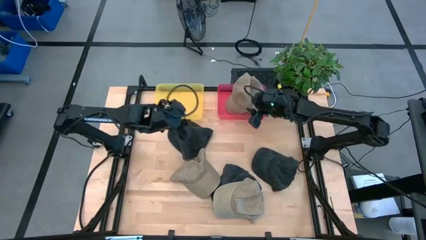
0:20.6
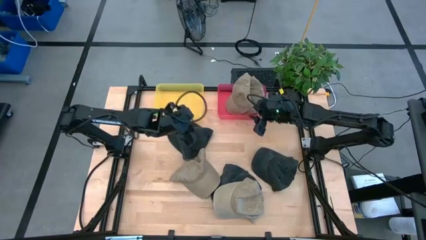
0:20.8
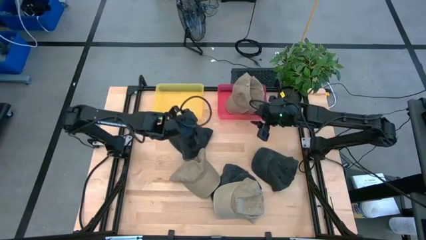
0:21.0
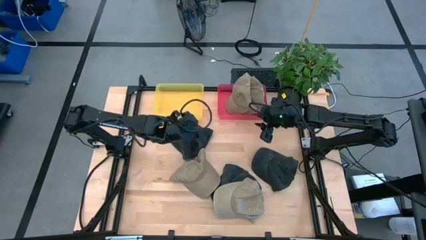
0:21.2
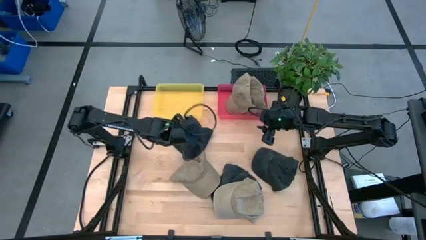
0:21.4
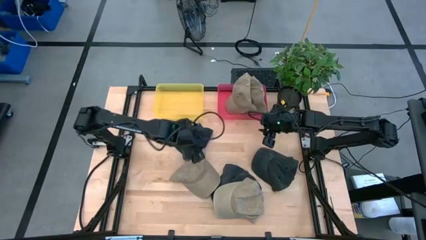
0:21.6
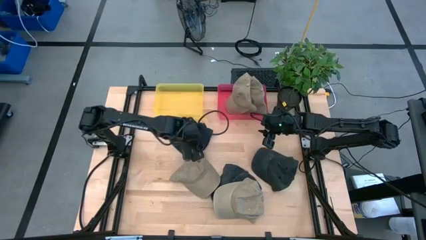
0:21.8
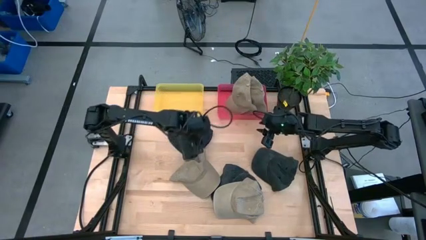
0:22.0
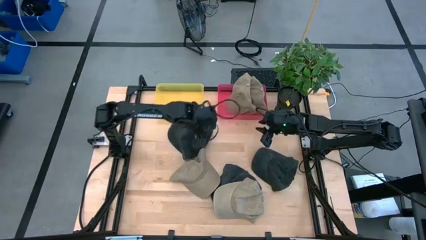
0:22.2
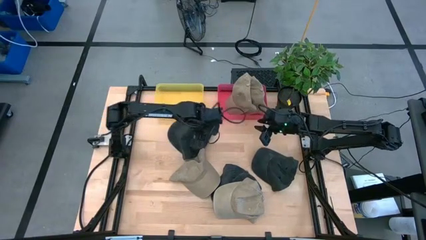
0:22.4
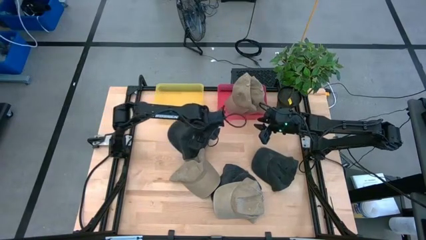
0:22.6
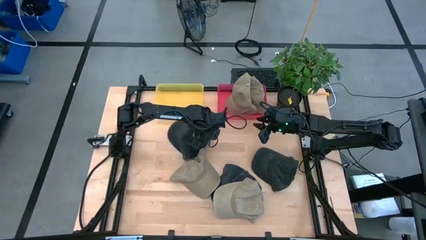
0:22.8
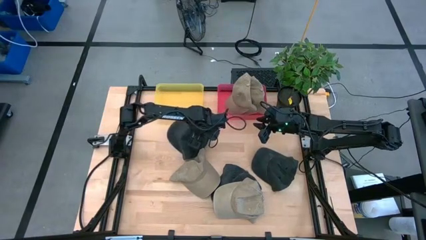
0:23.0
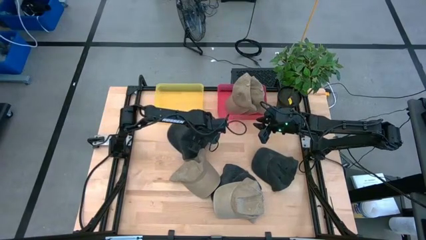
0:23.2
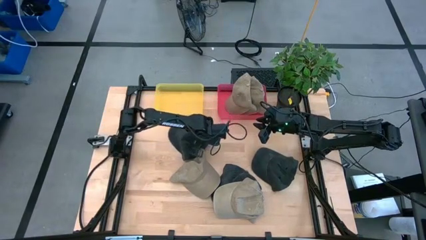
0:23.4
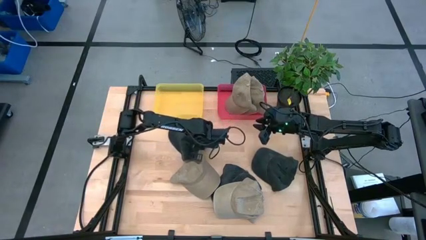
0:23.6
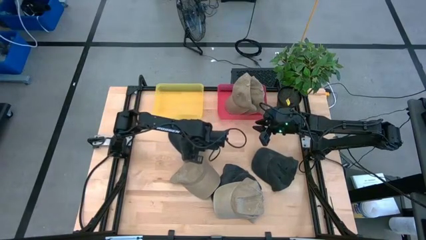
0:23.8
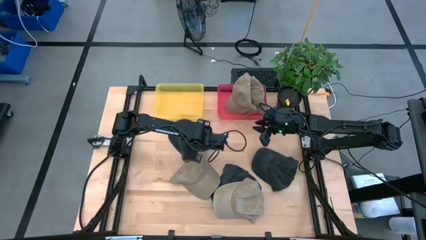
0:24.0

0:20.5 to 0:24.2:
Task: Pick & Place hat
Put the black cap into the yellow bin

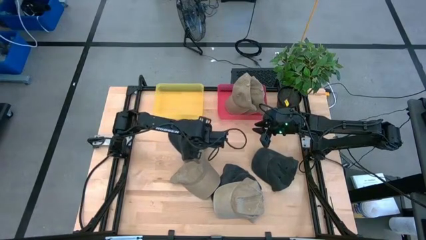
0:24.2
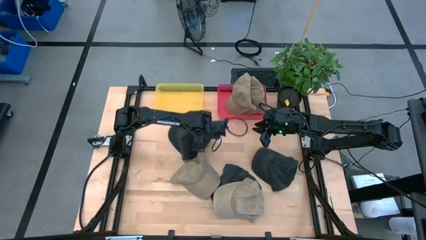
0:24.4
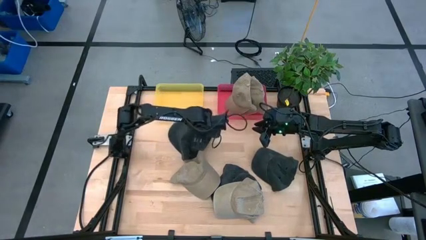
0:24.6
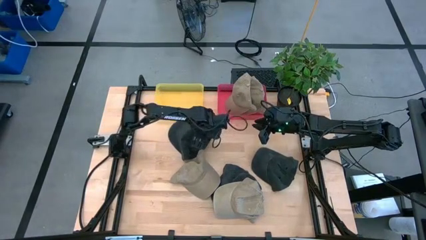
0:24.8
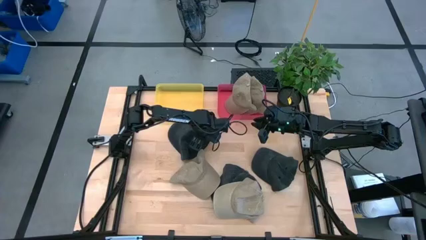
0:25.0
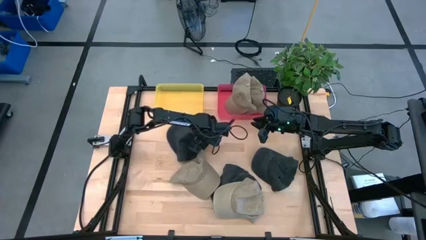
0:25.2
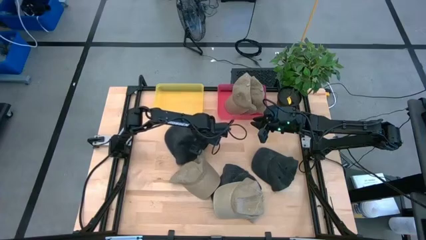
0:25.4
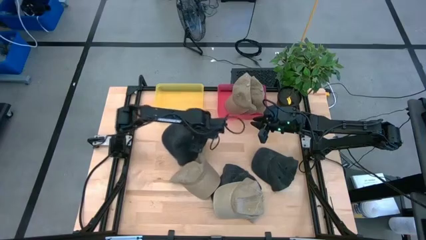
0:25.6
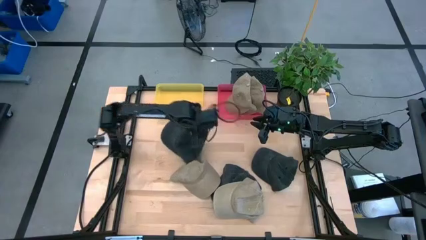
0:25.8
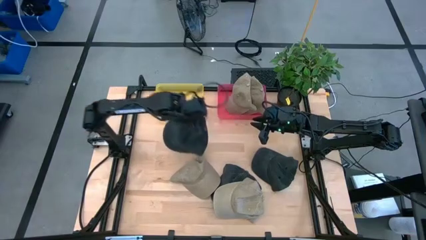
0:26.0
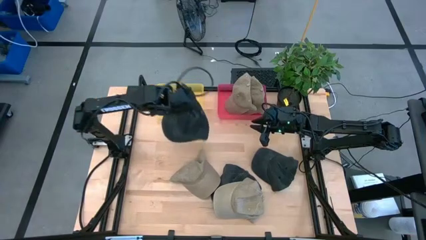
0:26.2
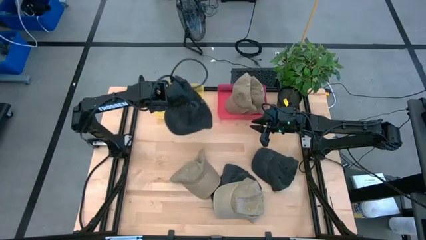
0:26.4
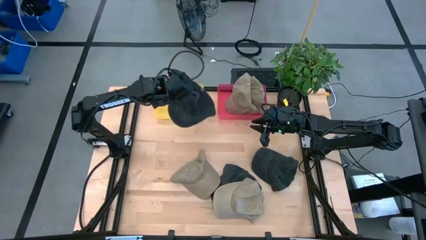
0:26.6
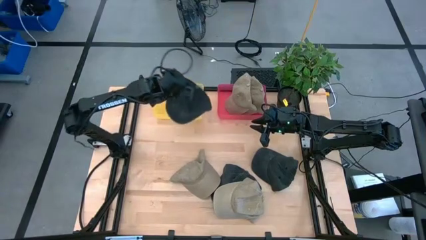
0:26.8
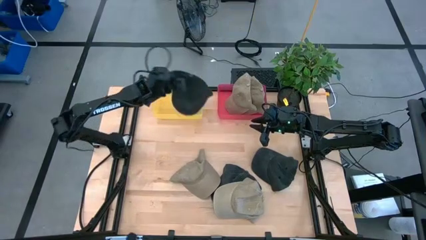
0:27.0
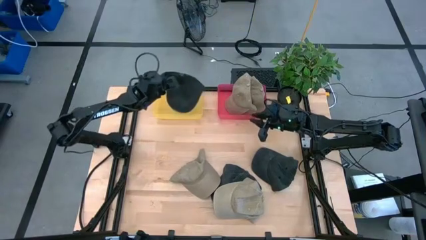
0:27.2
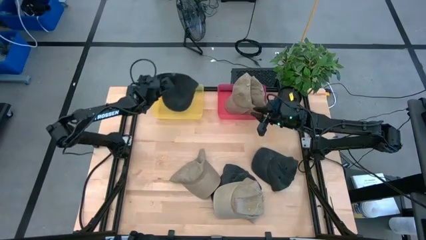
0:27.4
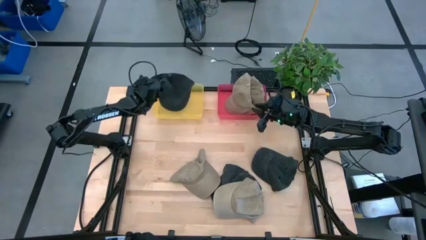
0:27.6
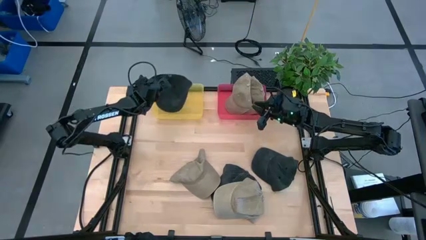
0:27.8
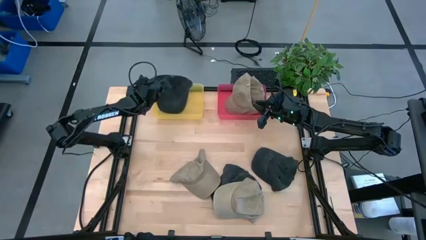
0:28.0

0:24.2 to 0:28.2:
Put the black cap into the yellow bin

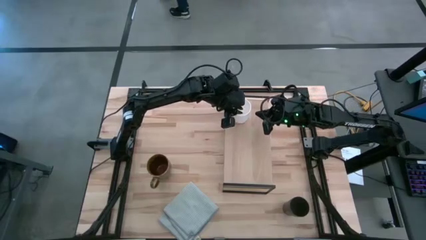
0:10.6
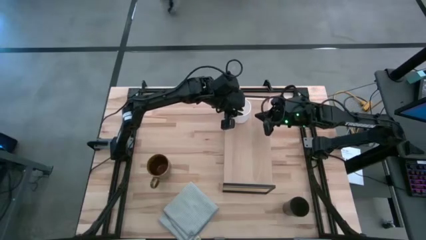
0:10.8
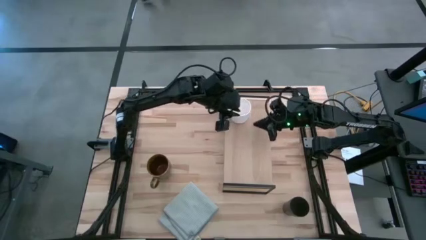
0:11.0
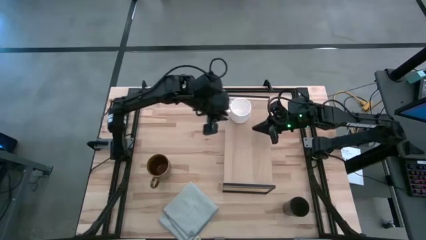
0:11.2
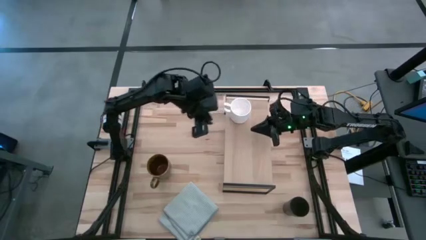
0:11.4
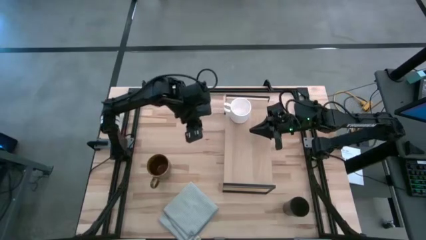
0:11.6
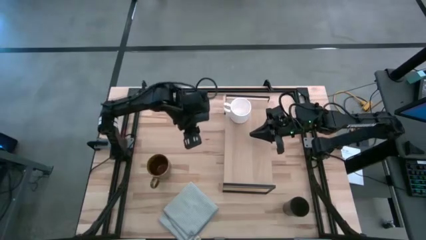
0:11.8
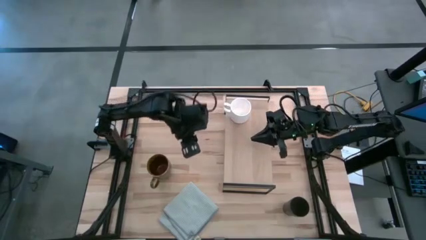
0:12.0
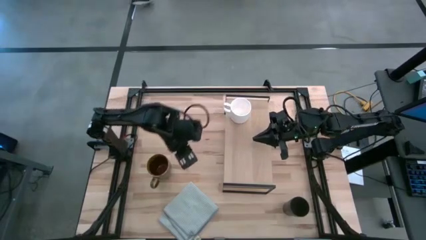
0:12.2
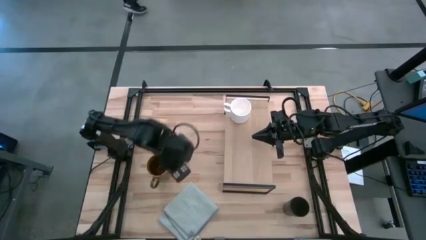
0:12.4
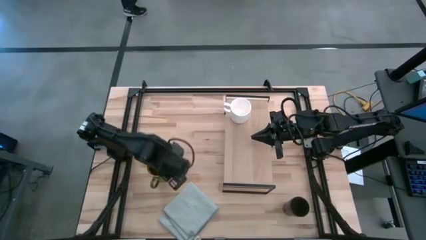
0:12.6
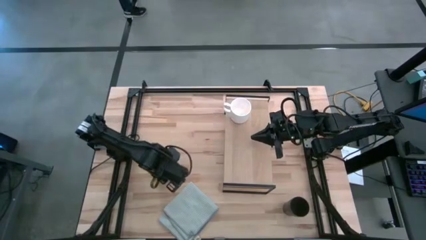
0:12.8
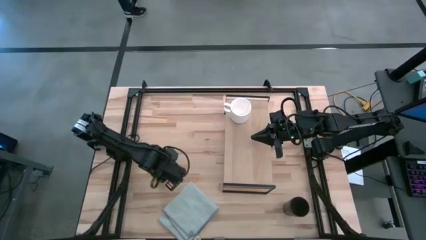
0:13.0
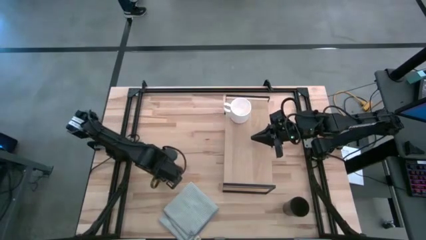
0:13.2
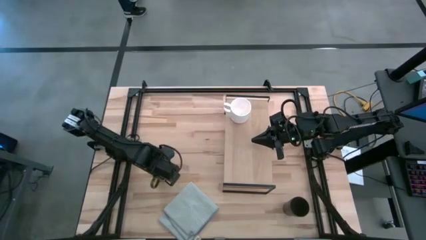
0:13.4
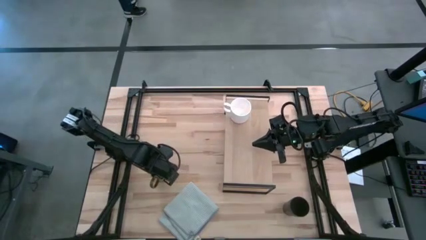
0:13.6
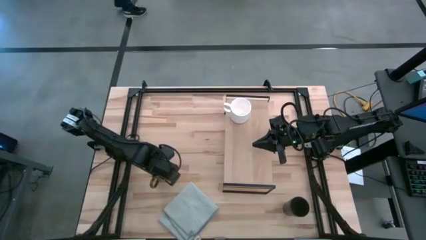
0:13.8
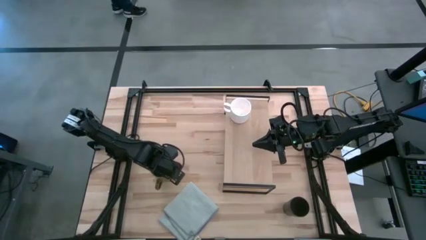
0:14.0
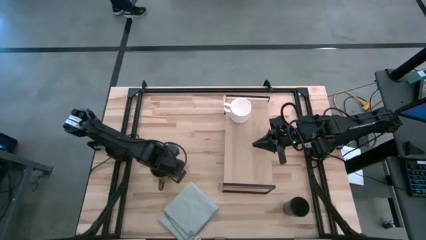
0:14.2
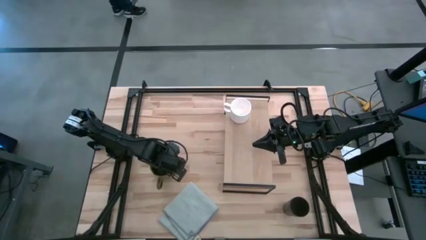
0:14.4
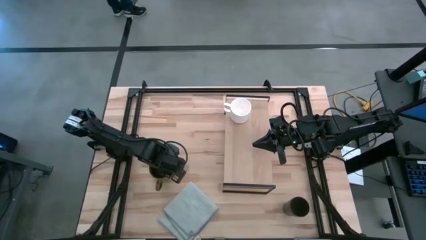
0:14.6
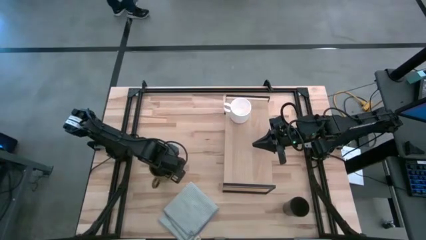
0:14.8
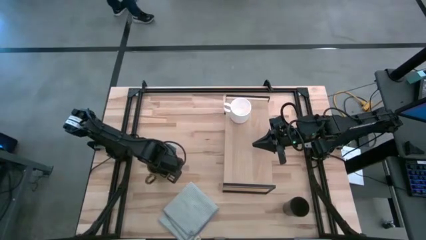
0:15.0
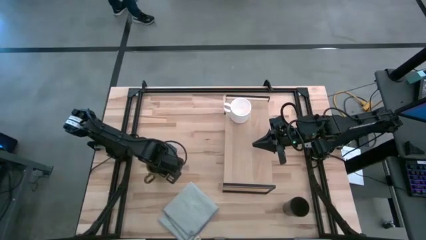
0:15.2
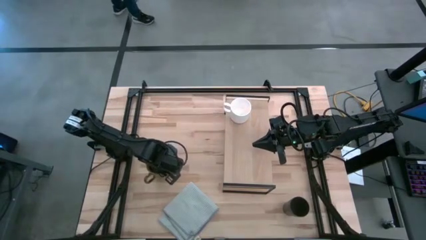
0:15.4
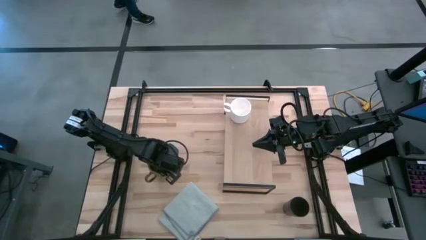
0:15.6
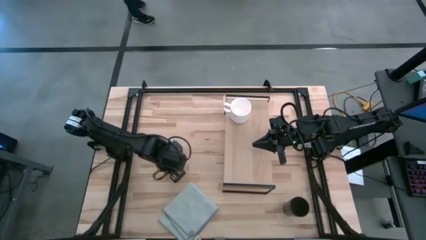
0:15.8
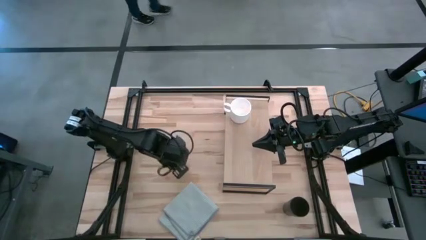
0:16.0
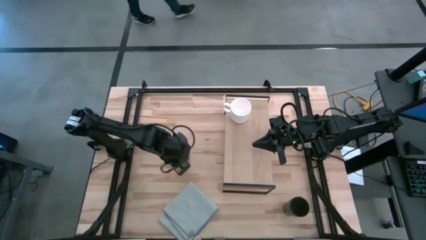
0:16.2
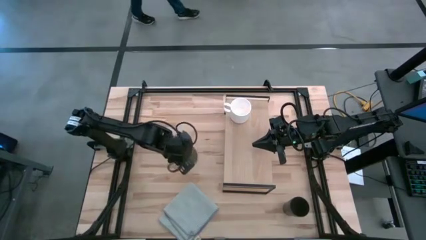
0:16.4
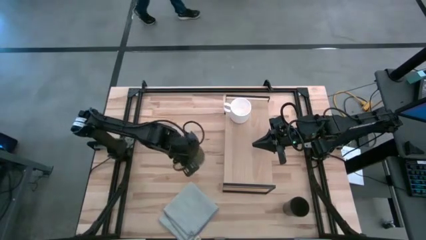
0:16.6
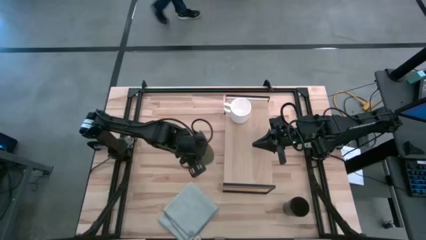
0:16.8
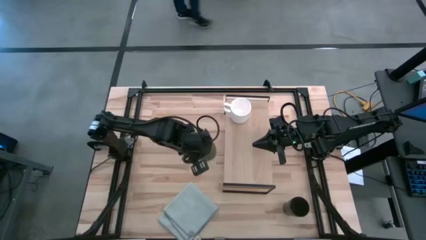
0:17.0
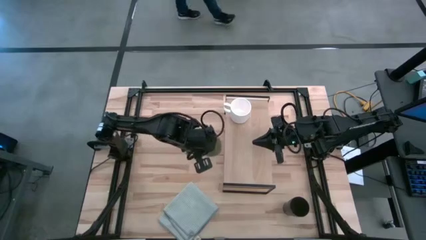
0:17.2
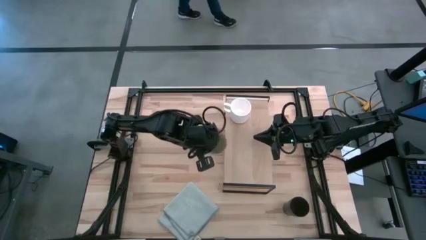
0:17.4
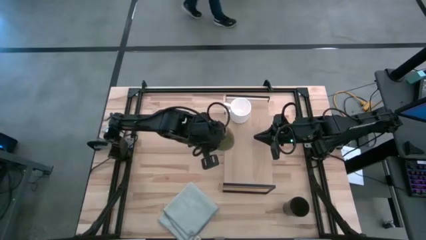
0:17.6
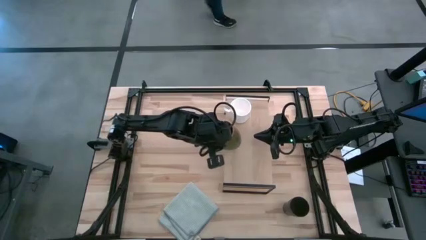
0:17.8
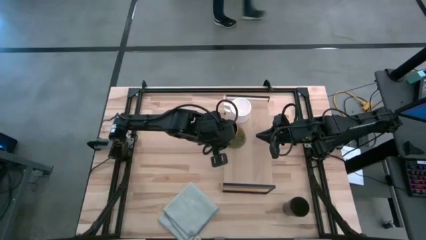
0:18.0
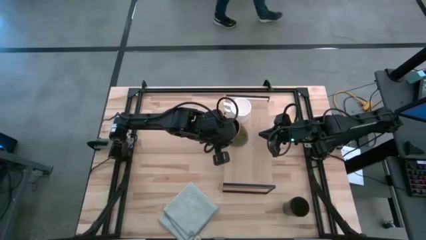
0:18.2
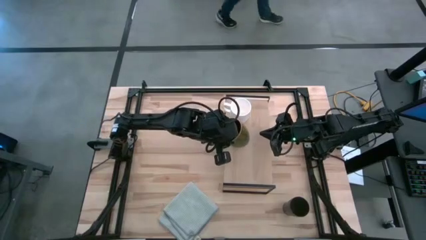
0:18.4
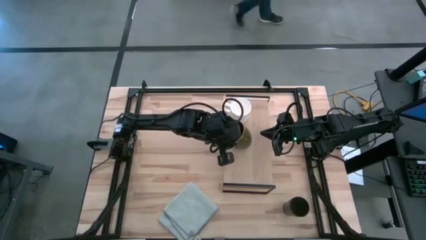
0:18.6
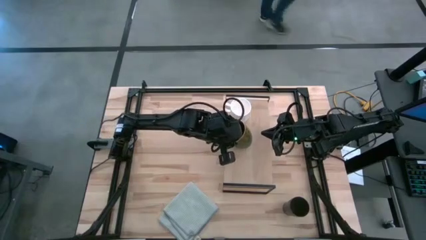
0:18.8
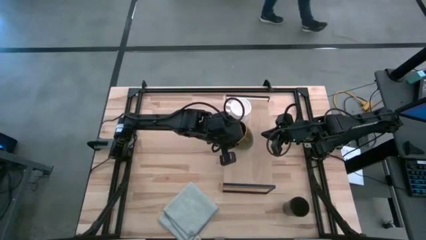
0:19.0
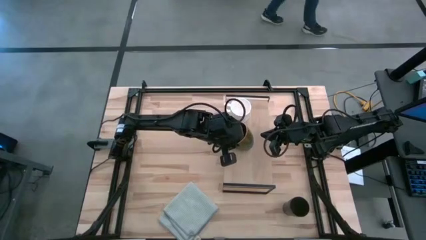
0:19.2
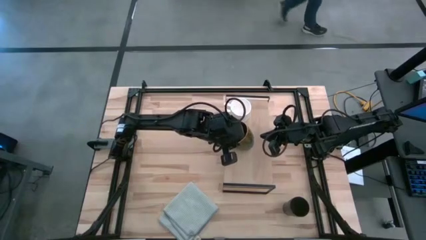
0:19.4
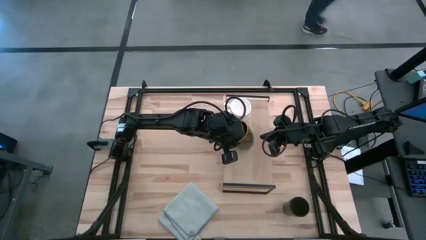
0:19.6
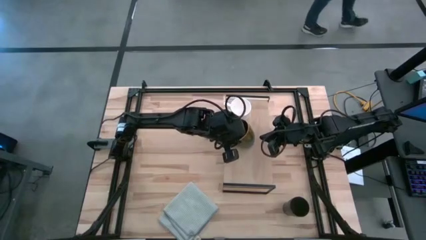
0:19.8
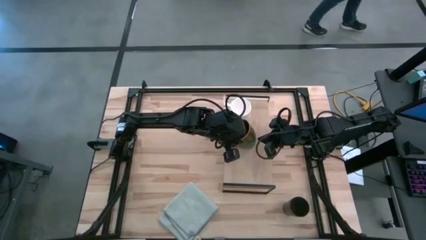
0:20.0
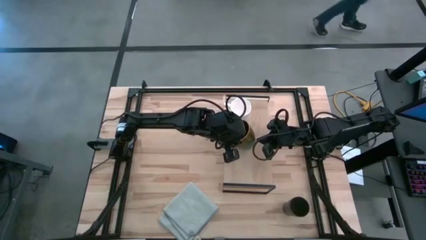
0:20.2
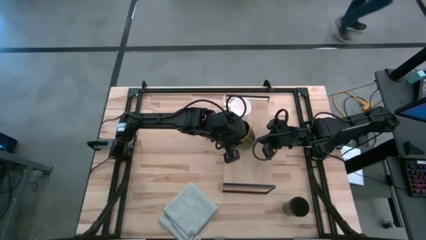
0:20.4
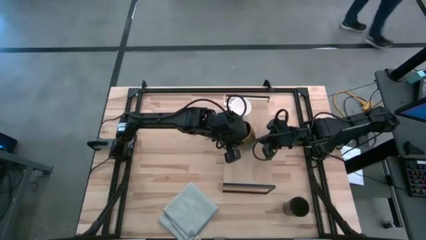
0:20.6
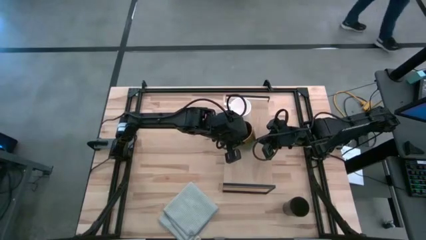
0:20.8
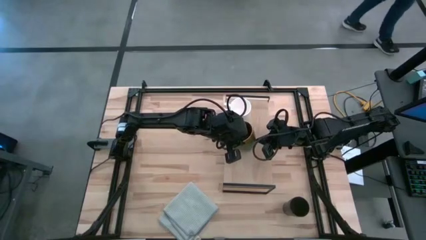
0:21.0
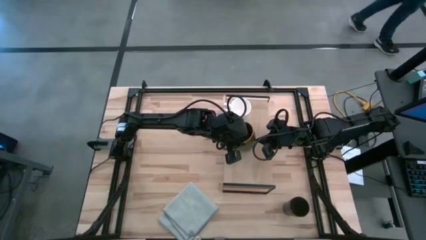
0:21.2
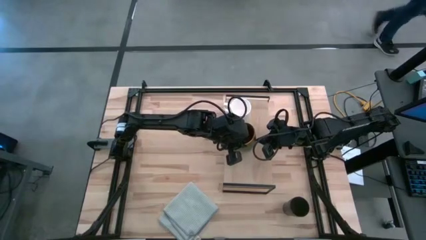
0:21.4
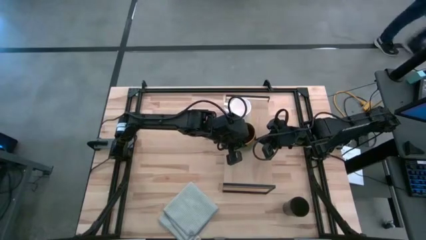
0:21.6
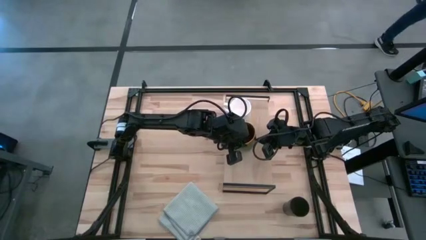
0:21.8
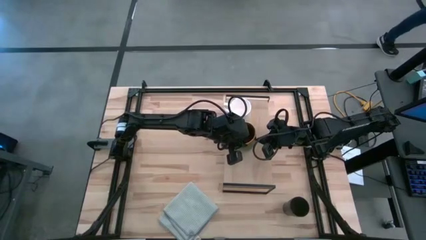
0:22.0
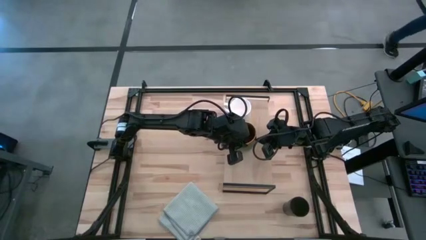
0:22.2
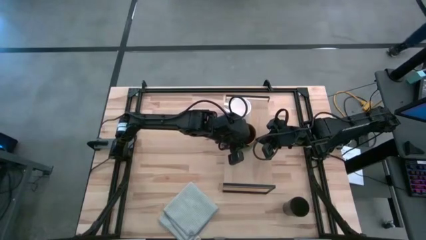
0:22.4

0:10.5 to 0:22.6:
Task: Stack small to large cups/mugs on shelf
Put the brown mug on the shelf
